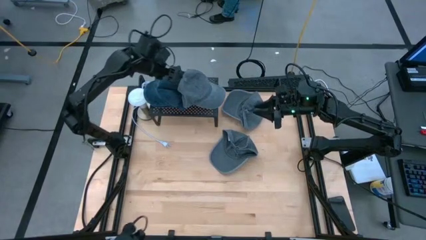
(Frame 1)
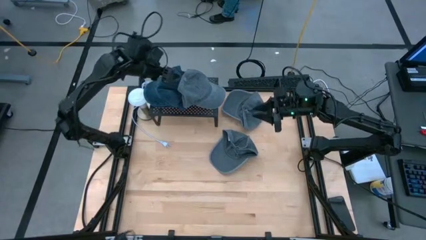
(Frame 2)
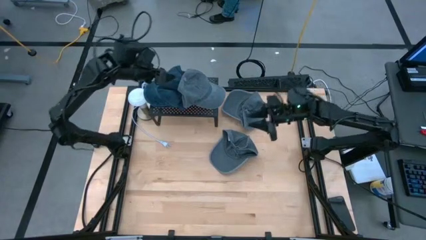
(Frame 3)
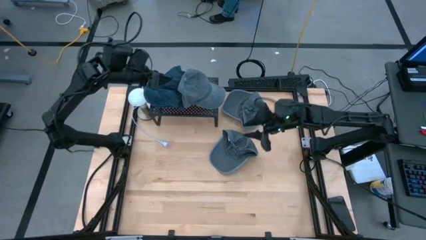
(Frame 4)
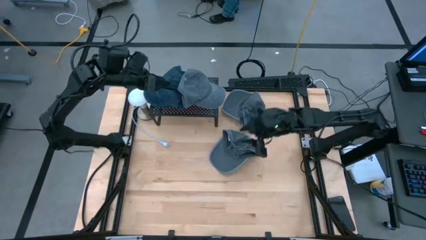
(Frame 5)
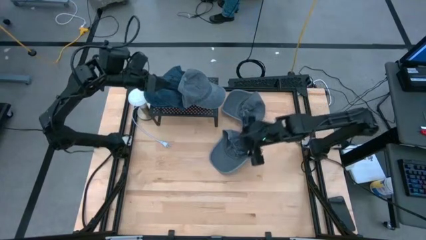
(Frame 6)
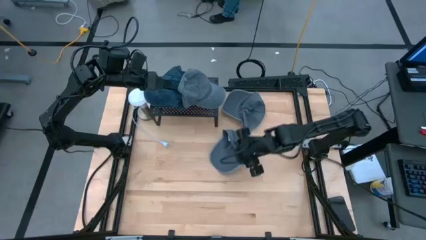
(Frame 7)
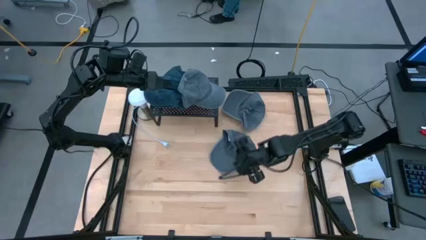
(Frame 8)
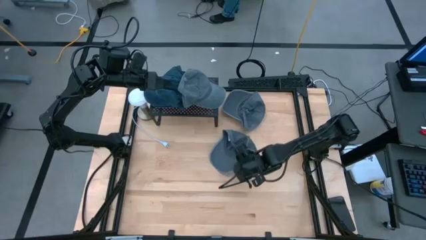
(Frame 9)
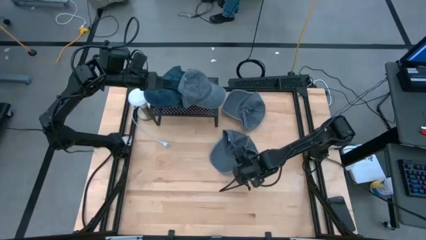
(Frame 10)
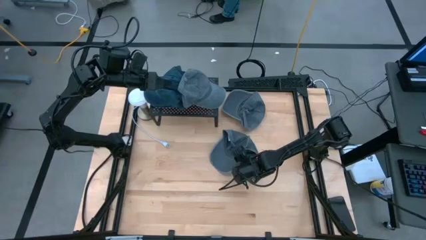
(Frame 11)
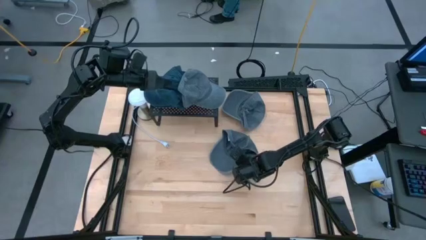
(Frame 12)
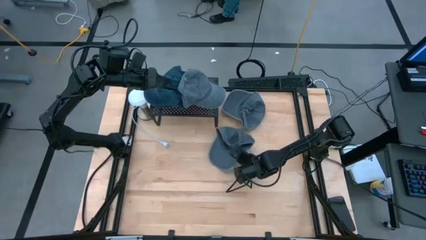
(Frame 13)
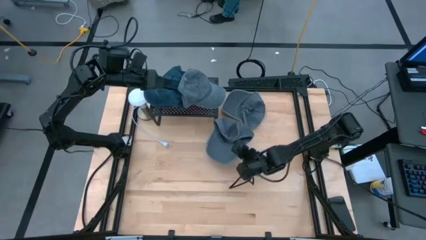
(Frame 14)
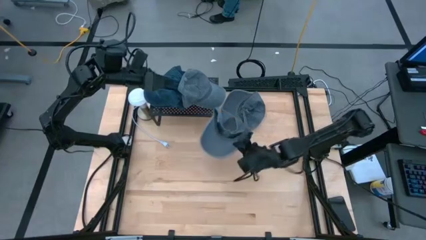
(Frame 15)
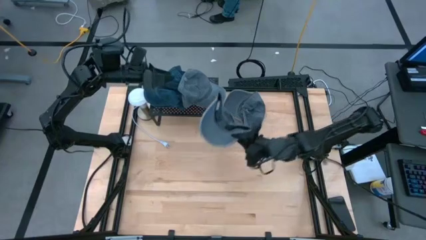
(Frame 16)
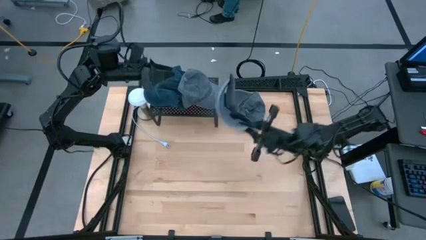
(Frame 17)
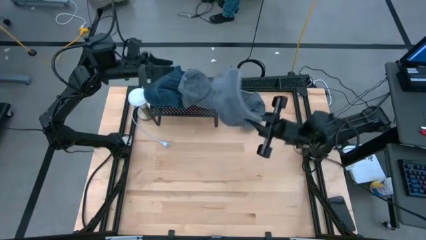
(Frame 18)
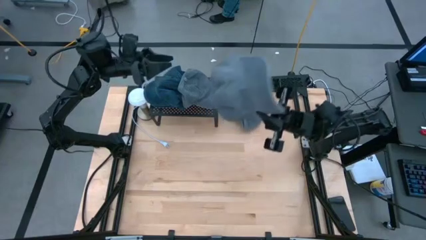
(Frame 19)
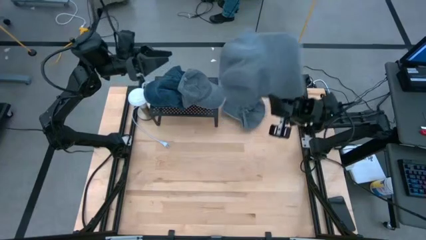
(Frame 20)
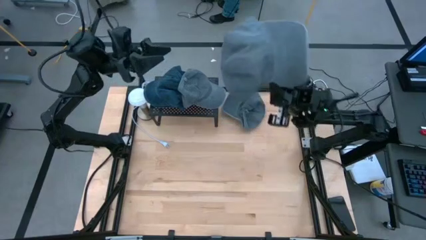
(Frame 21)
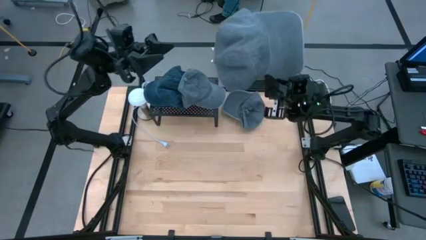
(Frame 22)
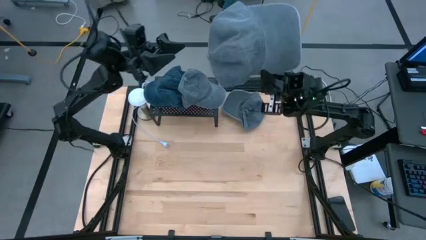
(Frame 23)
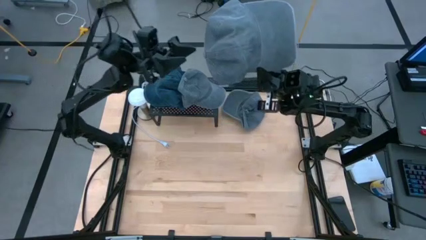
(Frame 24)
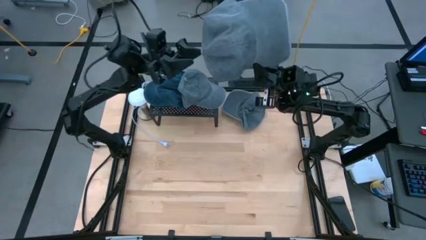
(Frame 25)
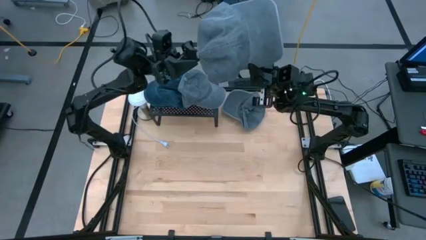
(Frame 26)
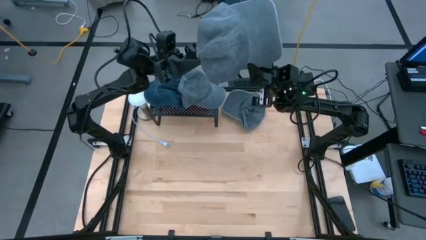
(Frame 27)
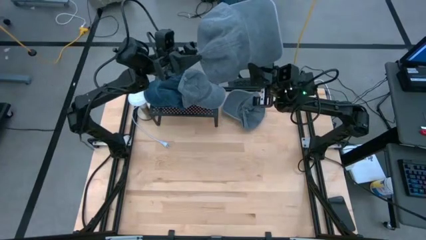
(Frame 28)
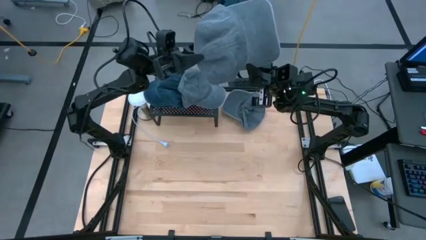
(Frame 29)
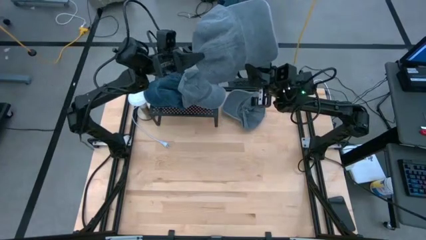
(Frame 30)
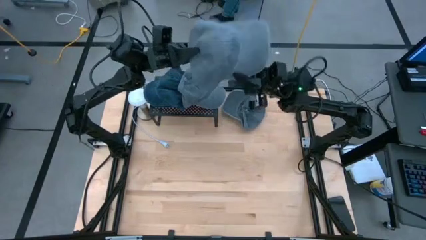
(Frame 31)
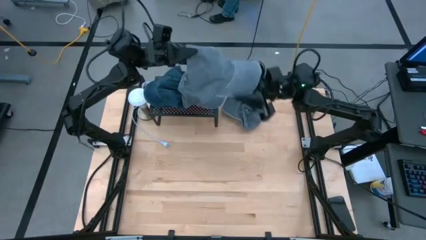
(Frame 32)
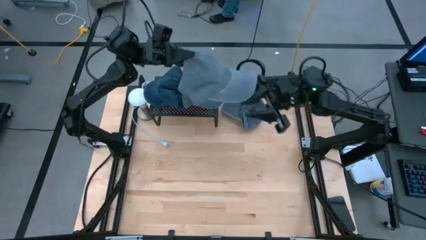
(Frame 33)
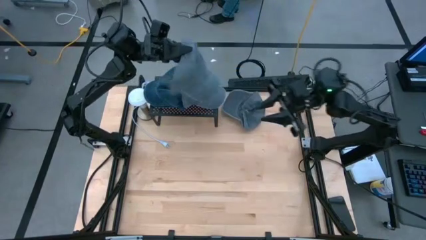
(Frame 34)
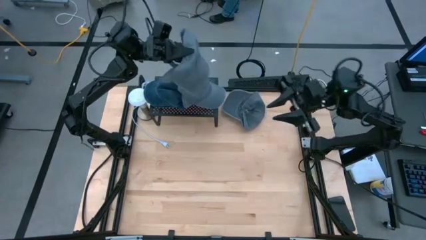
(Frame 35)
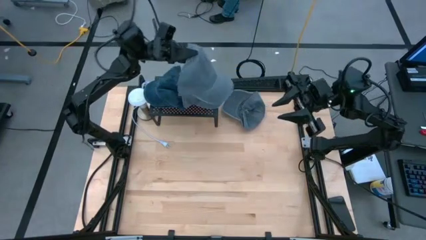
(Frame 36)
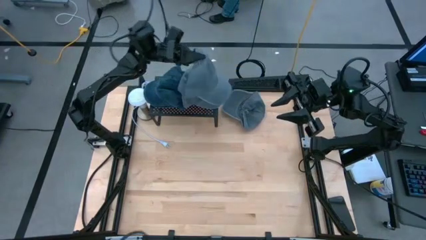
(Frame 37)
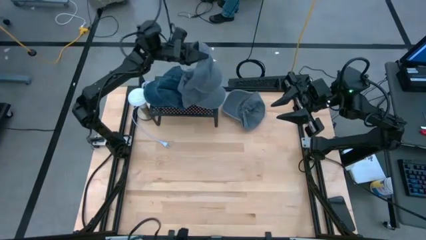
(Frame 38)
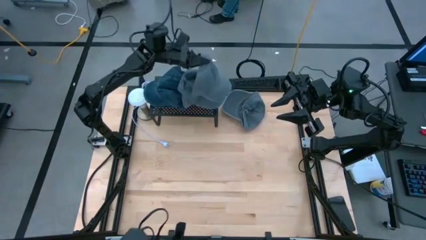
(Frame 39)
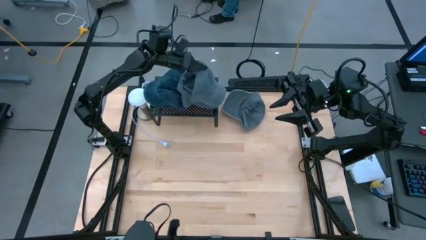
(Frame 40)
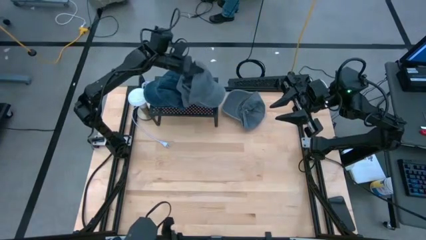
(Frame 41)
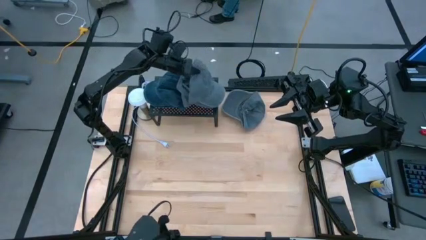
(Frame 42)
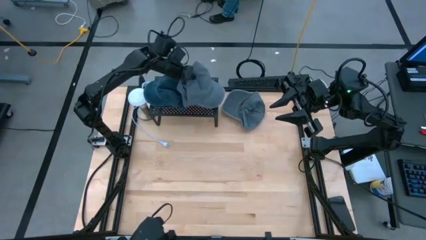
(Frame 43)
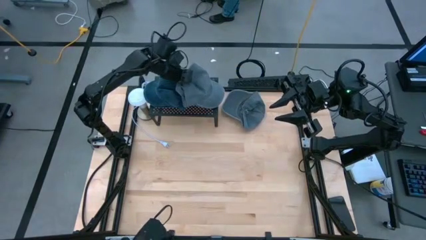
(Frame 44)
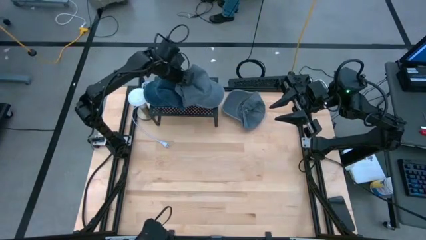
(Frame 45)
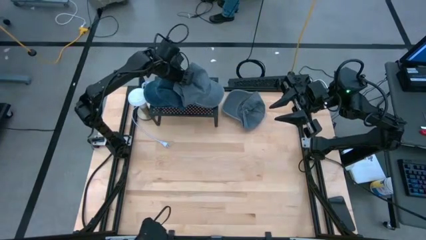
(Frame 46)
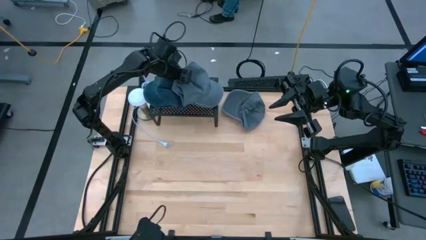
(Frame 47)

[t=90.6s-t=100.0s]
Task: Pick & Place hat
Stack the left gray cap on the other gray cap on the shelf

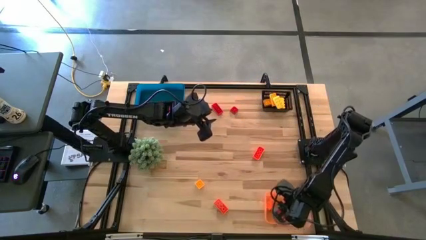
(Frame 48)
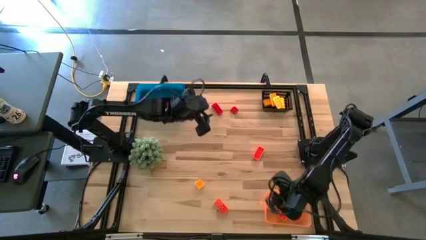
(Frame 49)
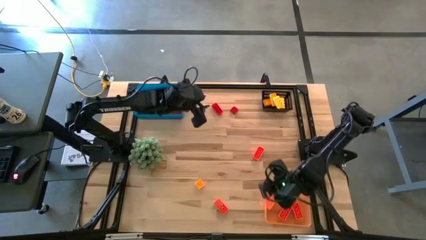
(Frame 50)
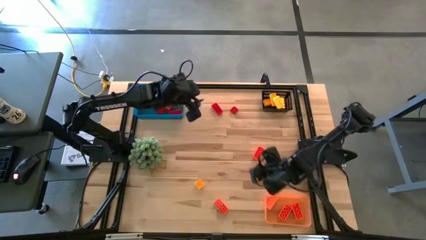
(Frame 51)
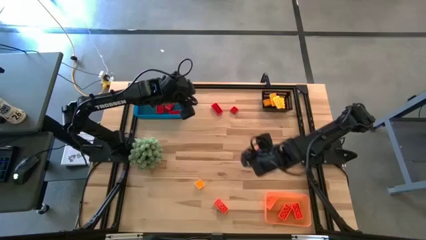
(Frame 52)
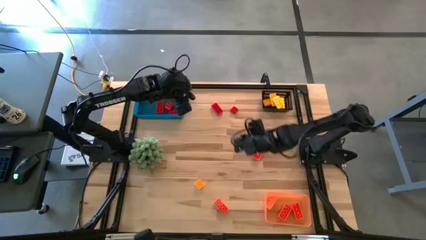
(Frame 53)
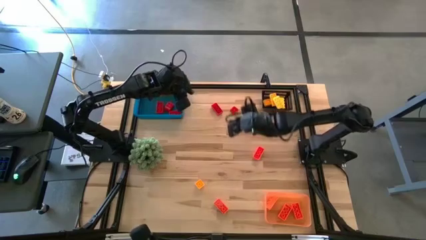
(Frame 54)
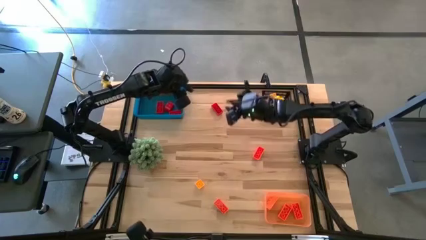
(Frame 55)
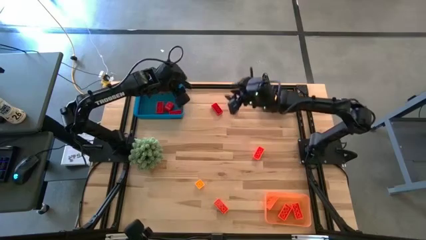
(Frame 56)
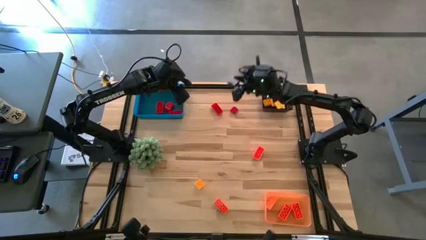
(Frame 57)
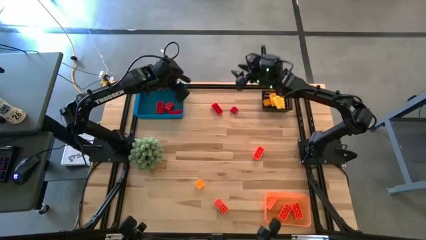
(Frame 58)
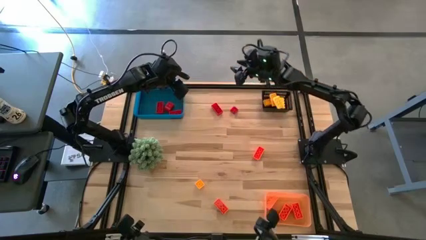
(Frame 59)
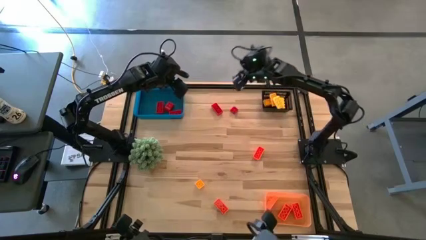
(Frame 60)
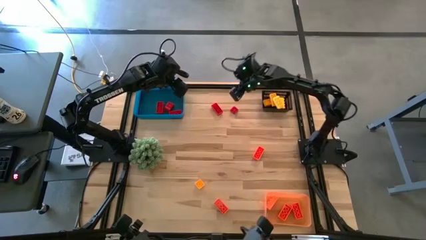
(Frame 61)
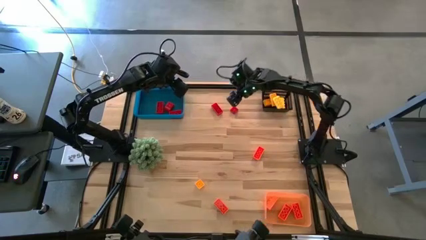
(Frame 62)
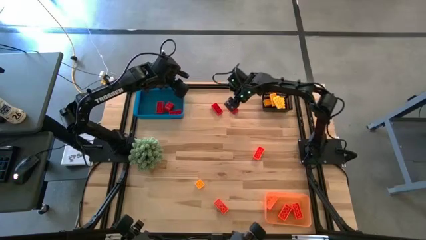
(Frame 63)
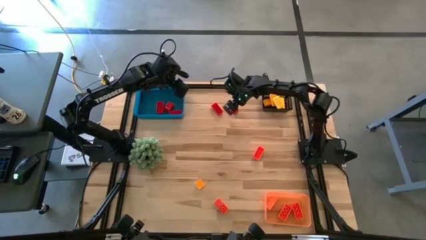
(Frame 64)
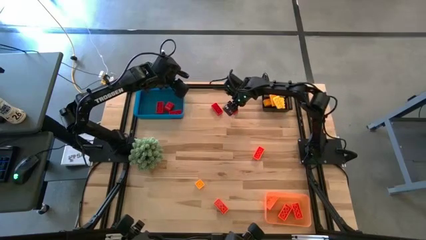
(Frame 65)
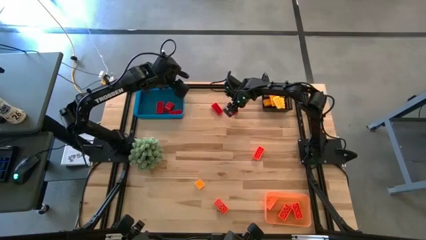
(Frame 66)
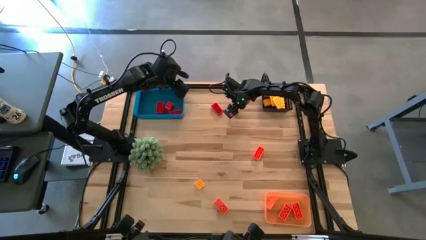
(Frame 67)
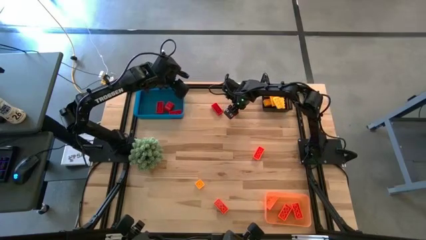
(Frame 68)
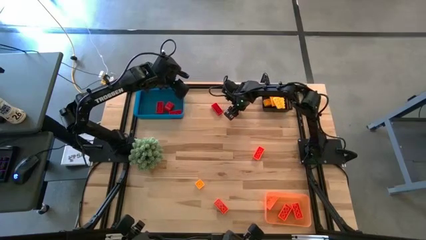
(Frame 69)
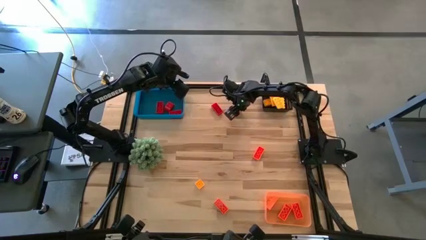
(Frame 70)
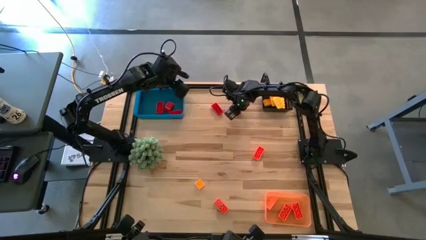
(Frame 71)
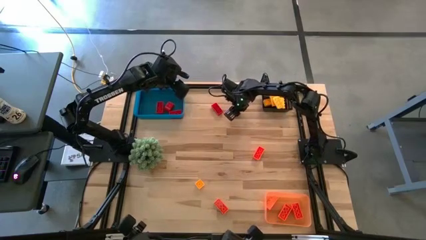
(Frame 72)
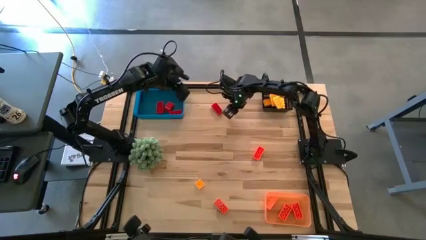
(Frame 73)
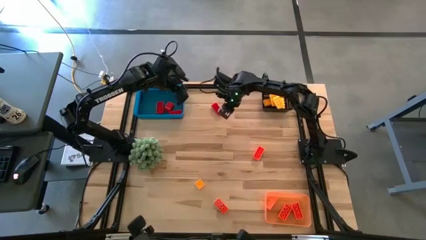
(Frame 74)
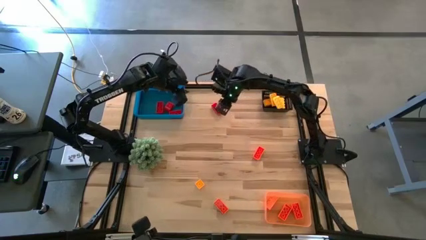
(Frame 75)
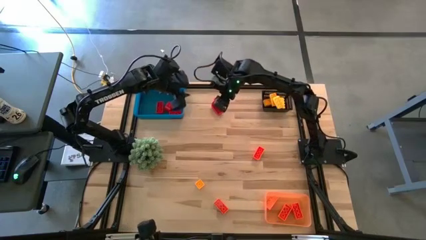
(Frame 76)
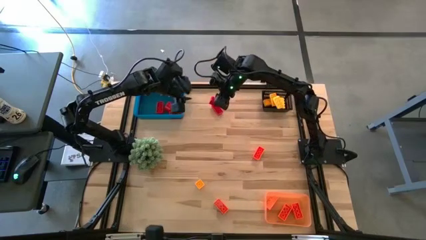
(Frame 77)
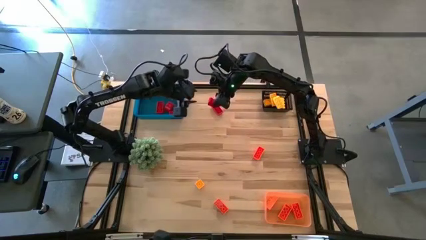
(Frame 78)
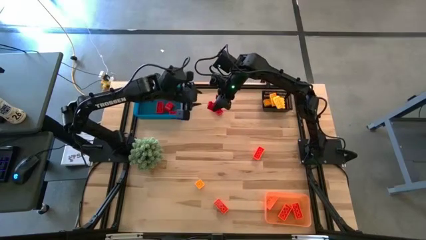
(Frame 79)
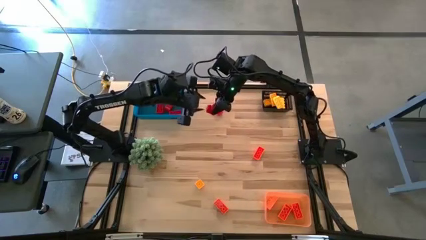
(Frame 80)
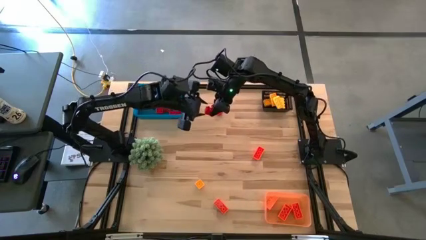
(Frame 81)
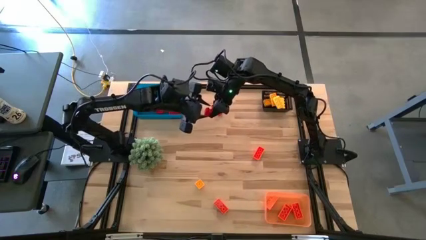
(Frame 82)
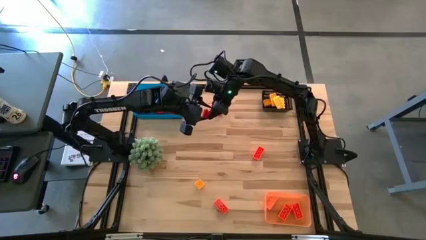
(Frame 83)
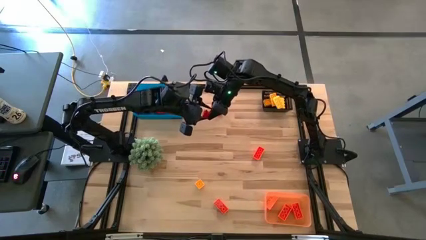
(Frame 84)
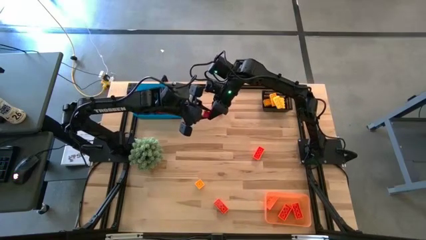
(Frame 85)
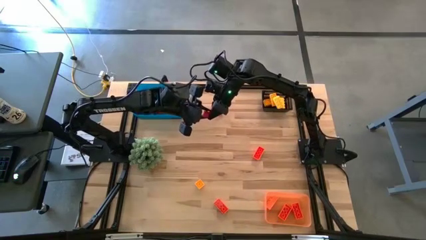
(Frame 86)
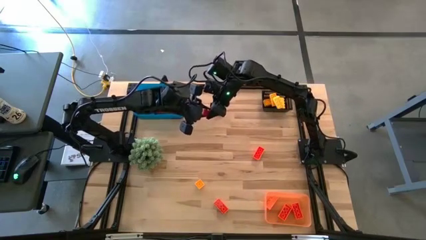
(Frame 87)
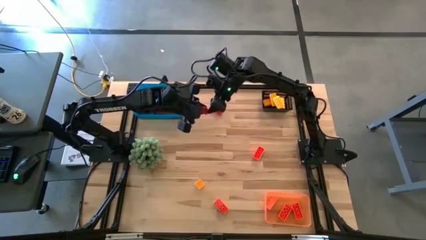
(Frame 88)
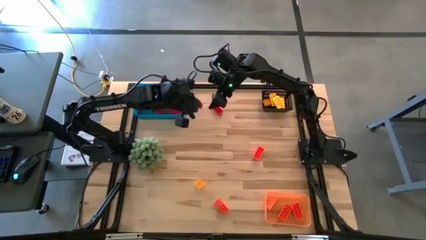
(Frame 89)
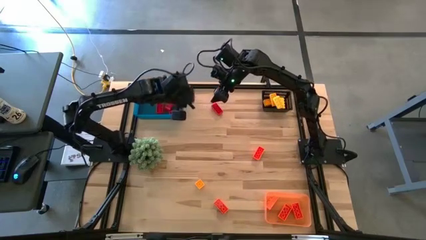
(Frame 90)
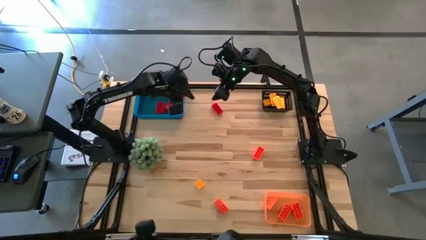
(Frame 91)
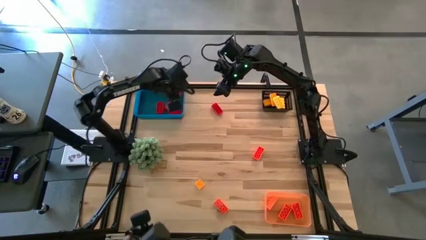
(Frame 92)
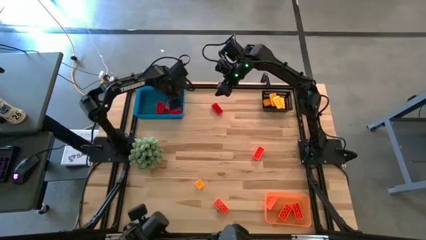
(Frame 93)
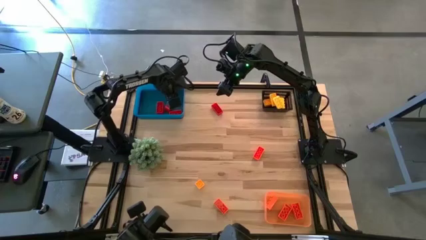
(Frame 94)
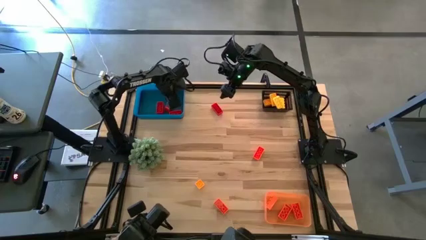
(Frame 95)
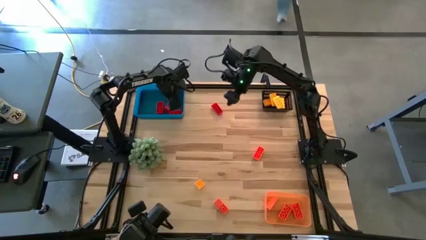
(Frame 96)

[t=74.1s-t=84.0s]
Task: Sort & place blocks by color
Put the red game piece into the blue bin
